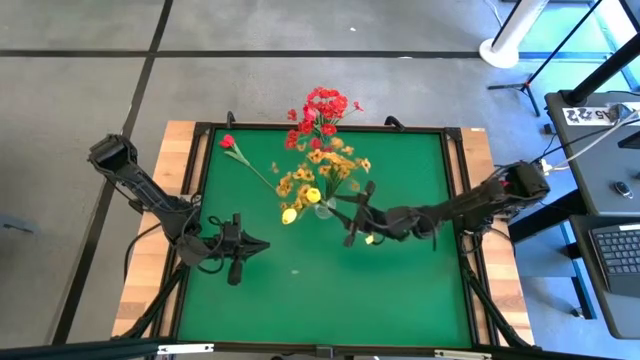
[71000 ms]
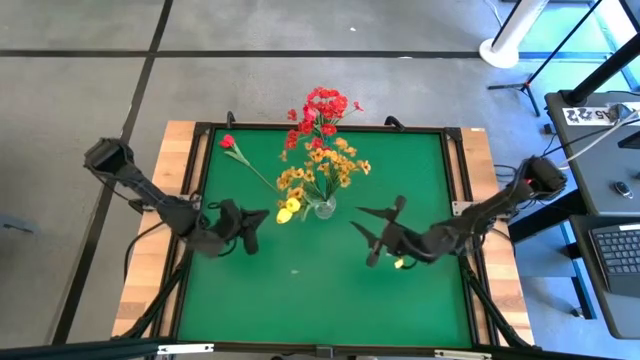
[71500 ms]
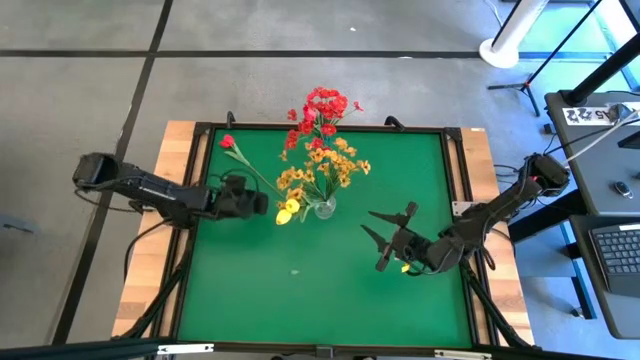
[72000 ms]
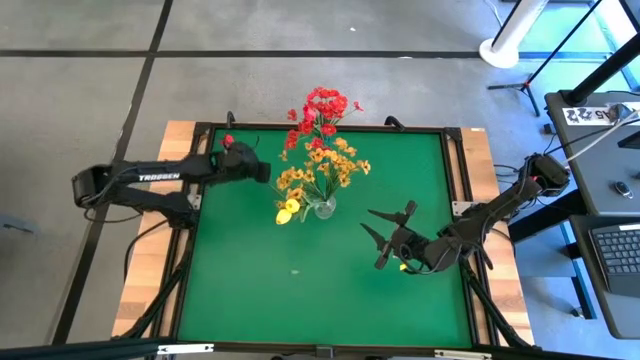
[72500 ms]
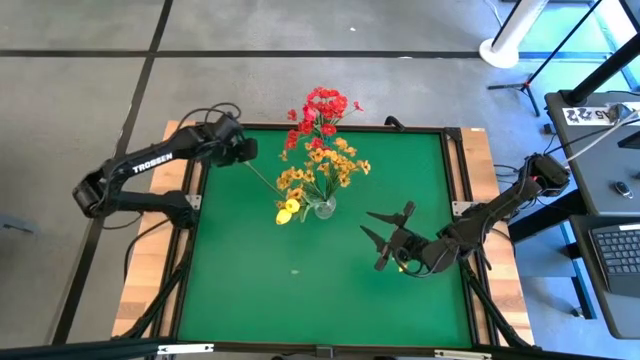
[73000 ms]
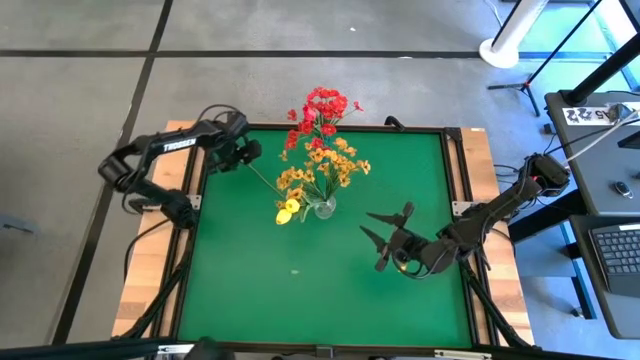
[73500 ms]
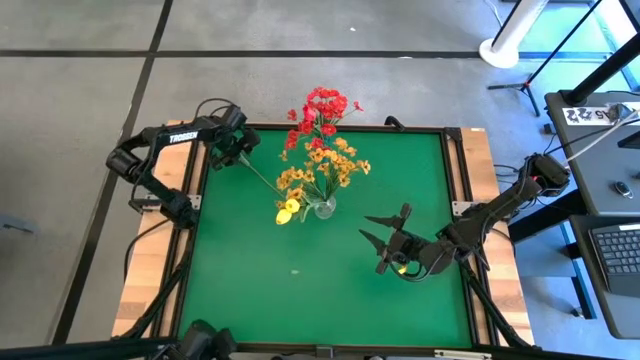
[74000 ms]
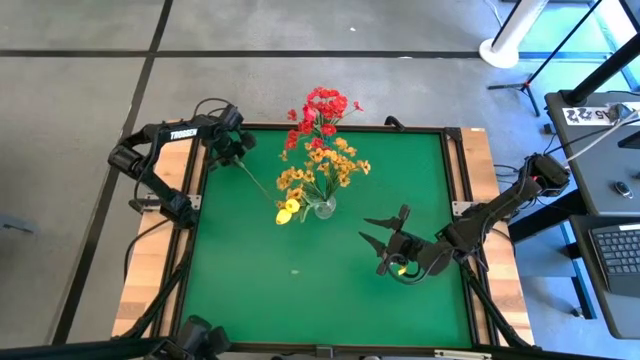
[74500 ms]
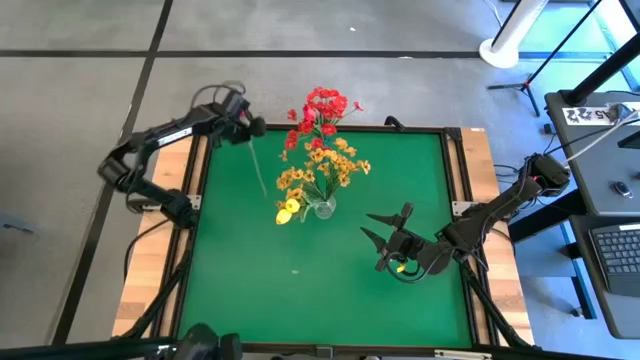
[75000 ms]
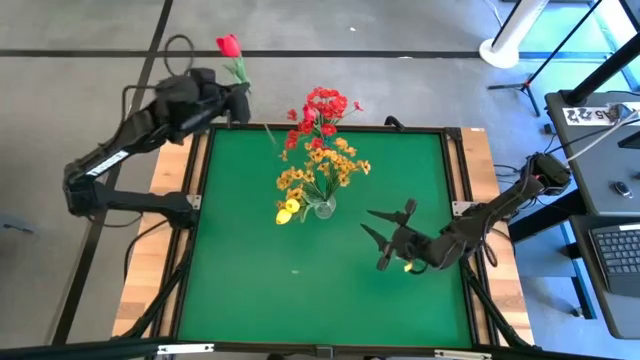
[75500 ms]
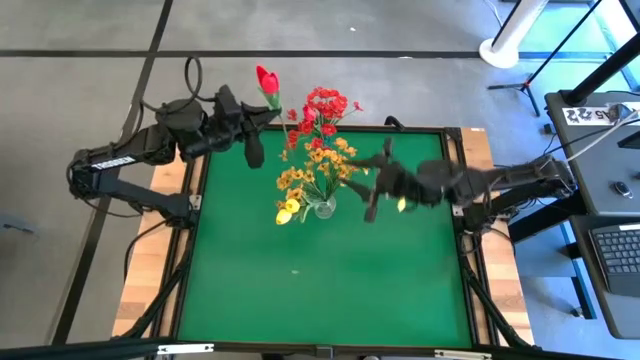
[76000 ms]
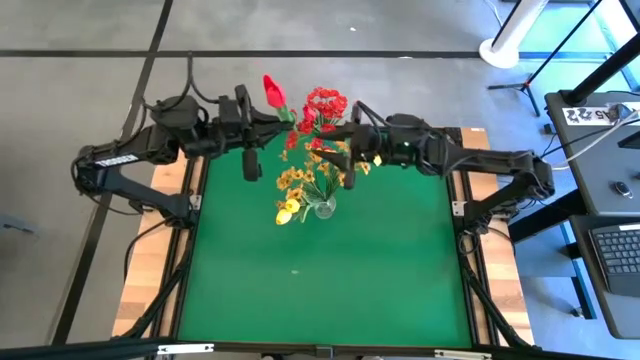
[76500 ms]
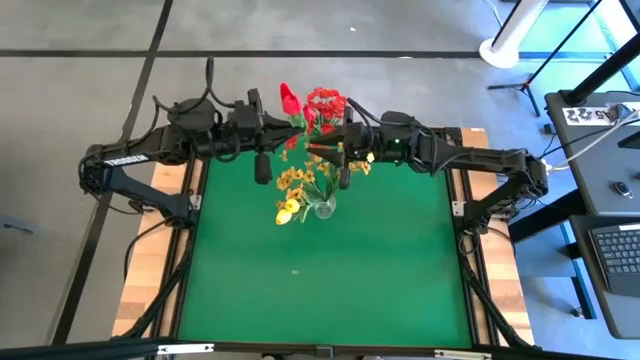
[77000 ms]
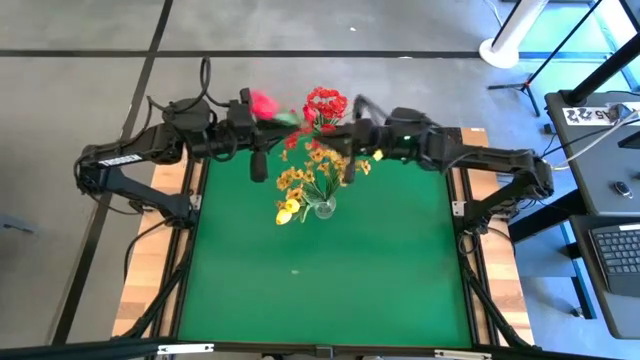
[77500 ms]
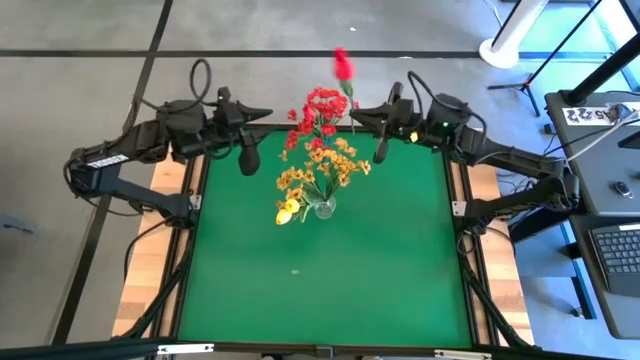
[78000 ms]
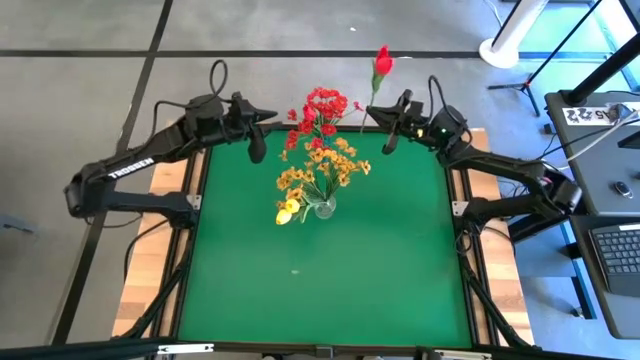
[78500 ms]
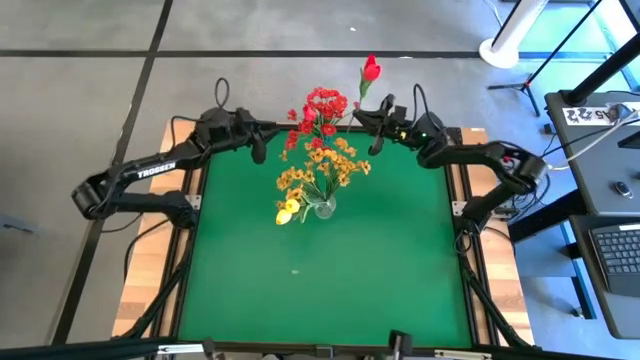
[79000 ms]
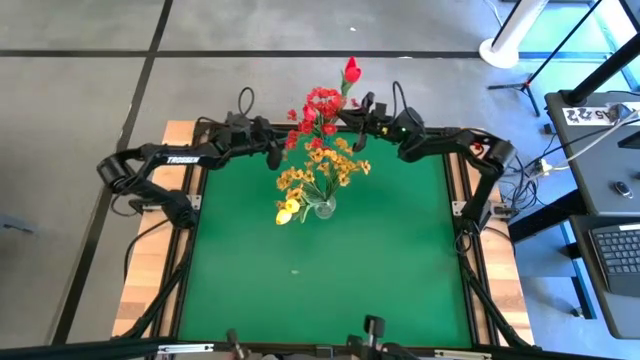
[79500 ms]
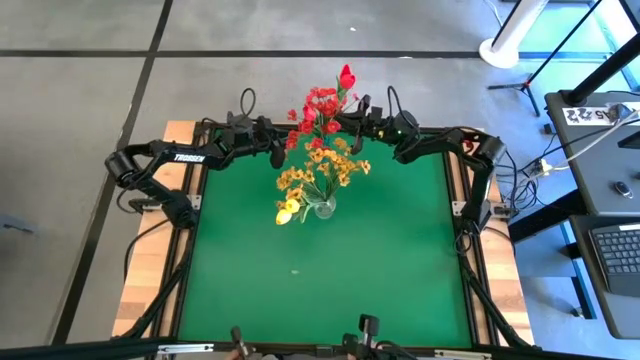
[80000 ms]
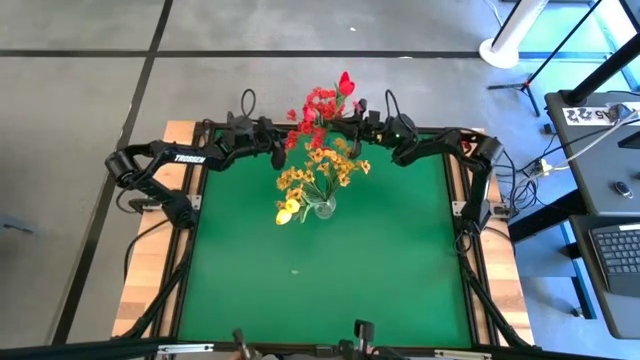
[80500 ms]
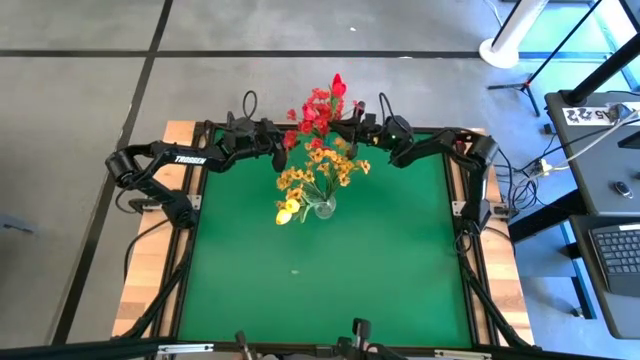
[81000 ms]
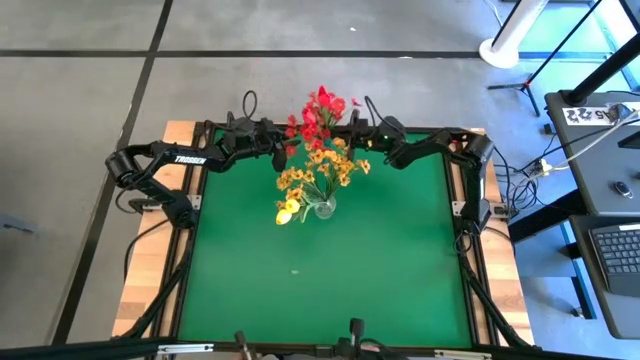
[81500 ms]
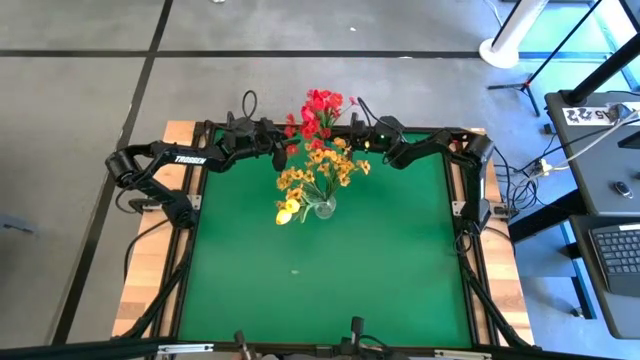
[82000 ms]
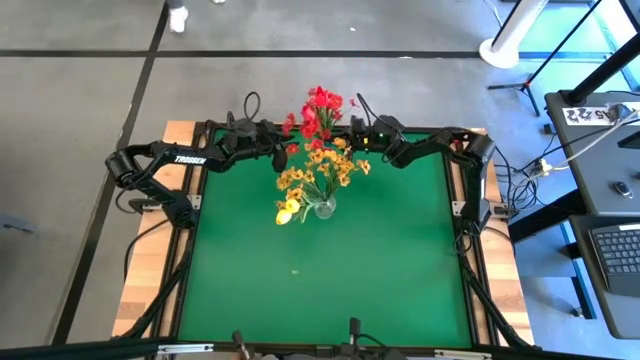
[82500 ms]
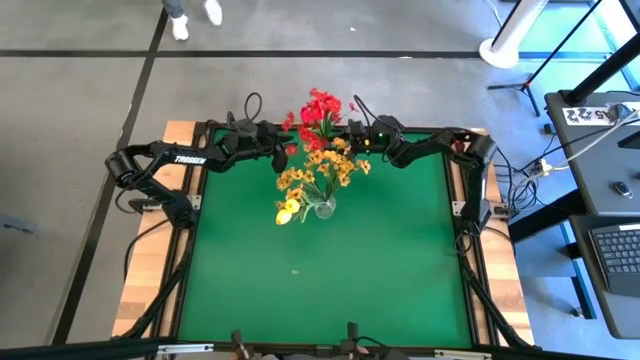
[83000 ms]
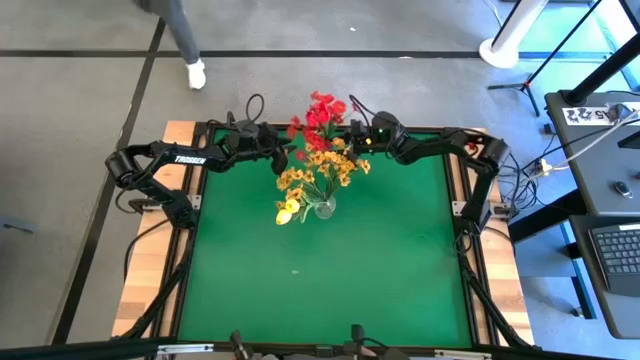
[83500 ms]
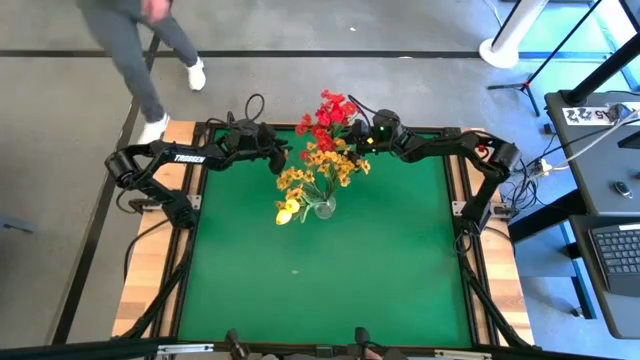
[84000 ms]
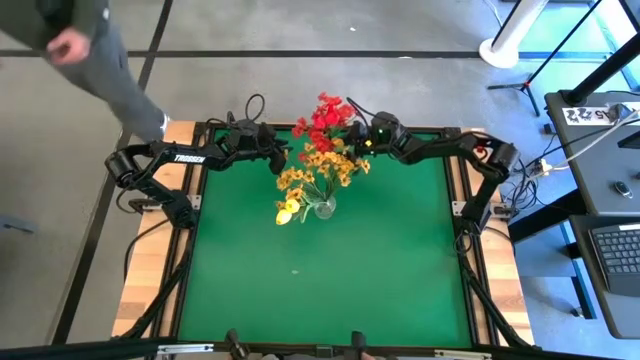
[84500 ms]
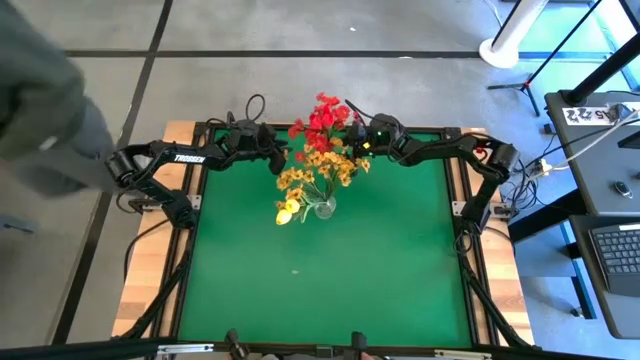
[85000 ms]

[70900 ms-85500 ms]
Task: Sort flowers into vase by color
Put the red tulip into the blue vase

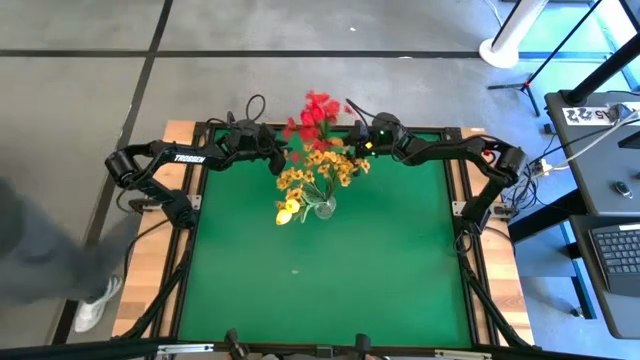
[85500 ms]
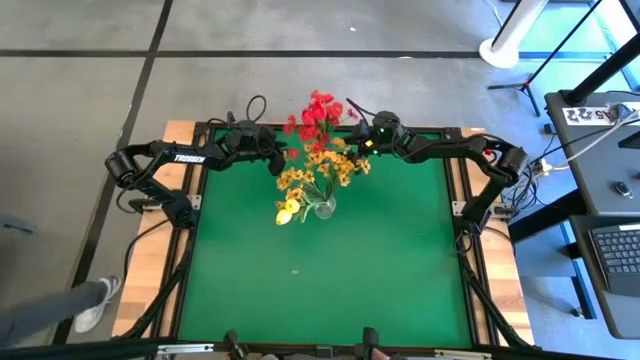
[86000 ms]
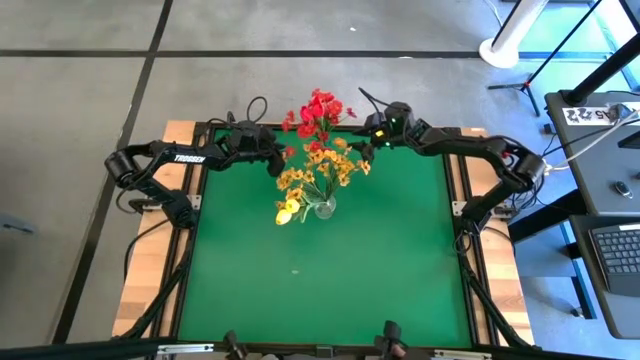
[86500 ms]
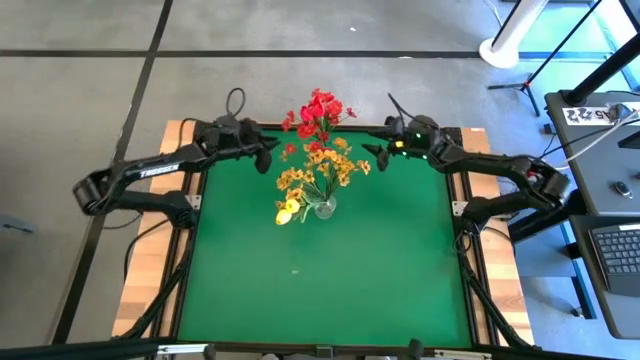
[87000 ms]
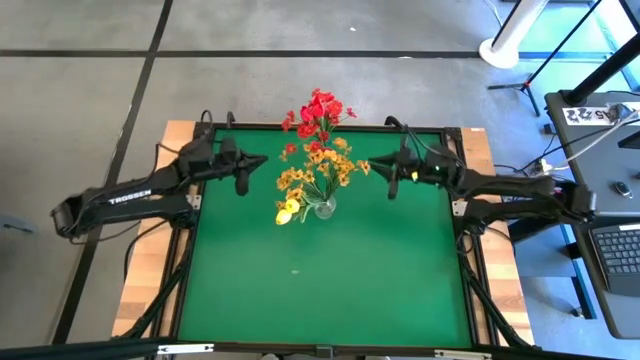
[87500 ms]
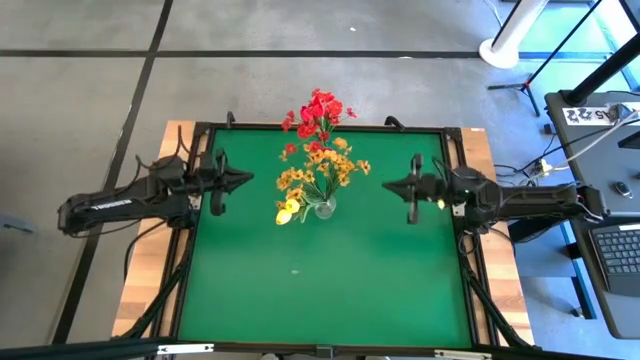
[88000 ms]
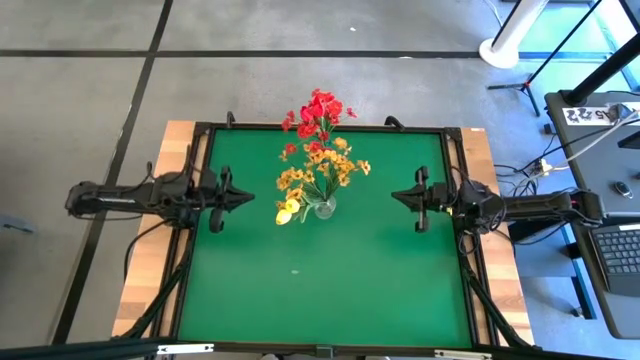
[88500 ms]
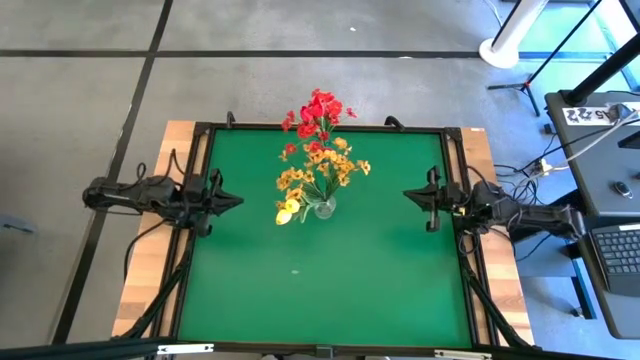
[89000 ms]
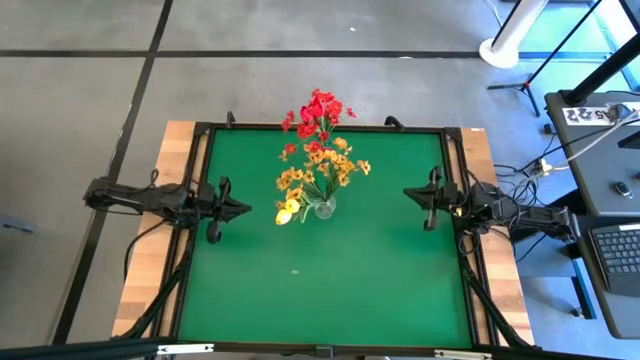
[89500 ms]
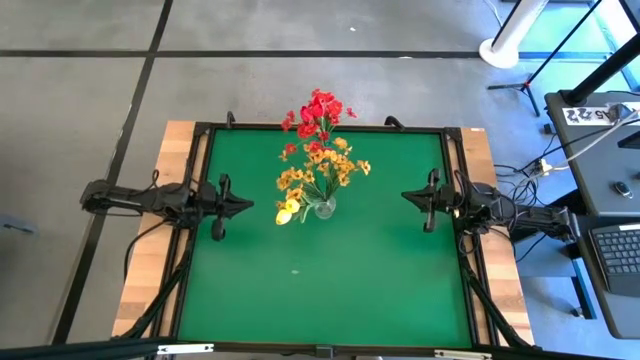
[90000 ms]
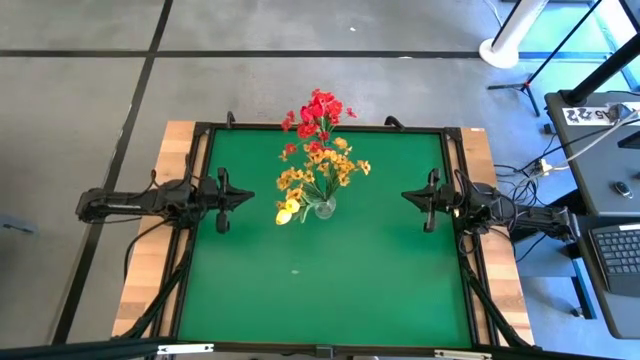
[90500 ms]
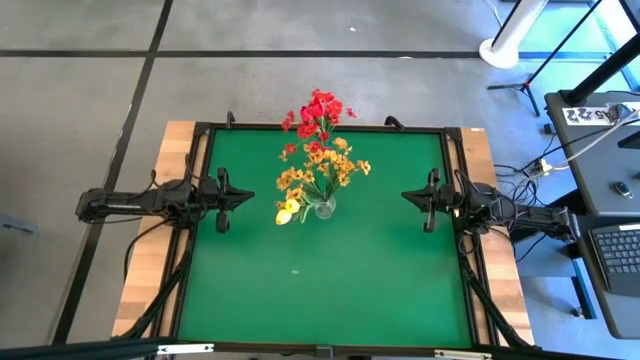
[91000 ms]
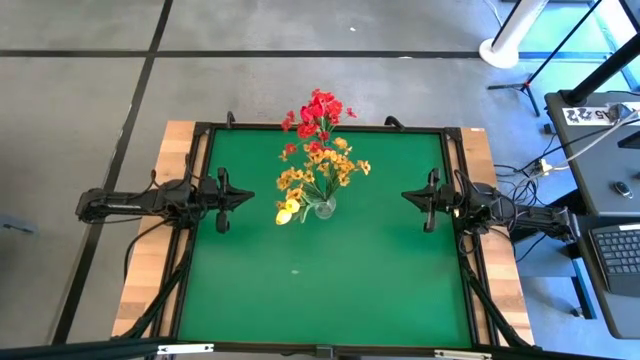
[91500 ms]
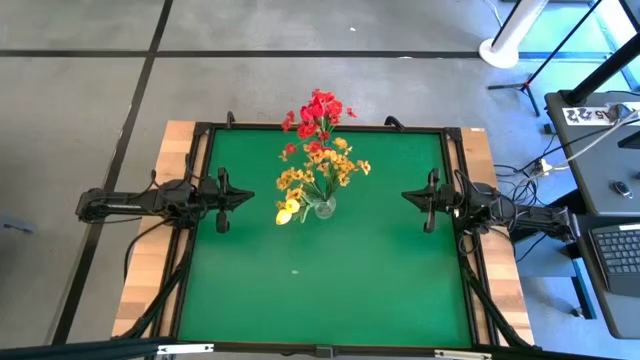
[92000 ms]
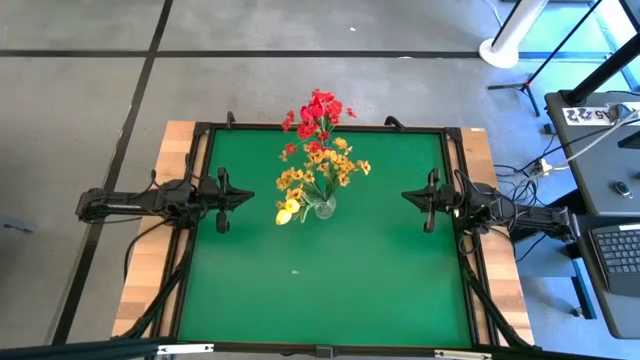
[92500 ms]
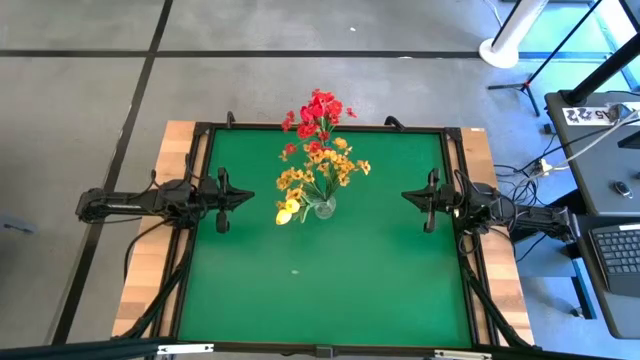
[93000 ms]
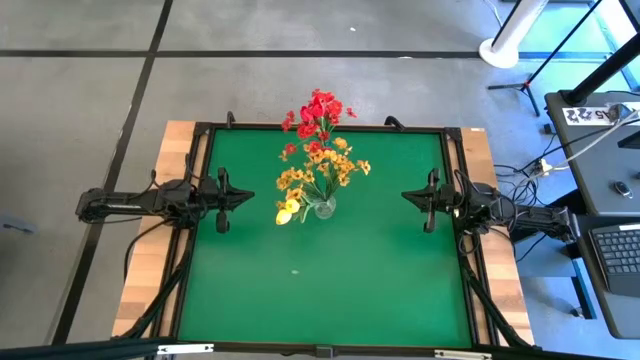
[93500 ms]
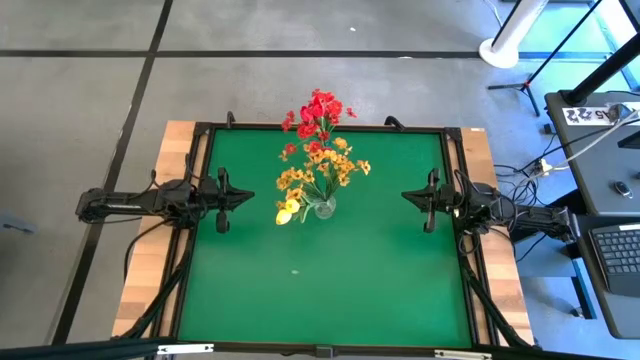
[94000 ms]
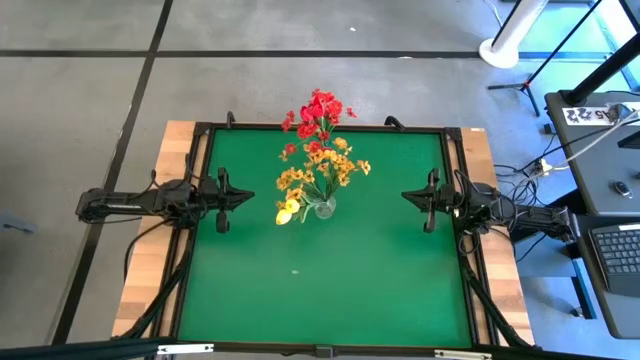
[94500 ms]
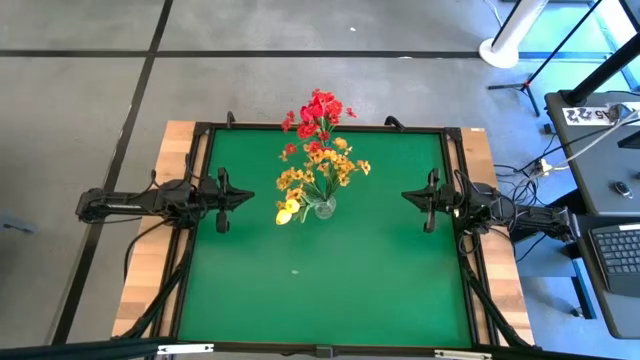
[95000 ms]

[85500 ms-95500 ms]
Return to Home Position
